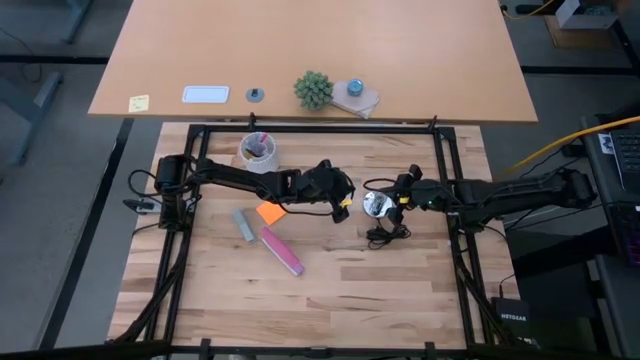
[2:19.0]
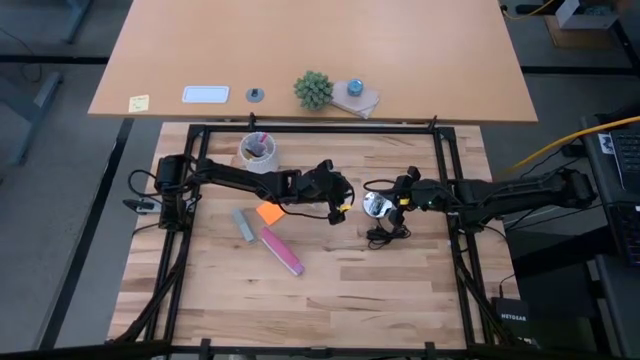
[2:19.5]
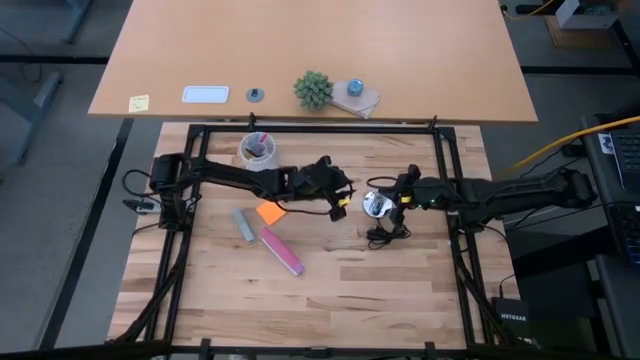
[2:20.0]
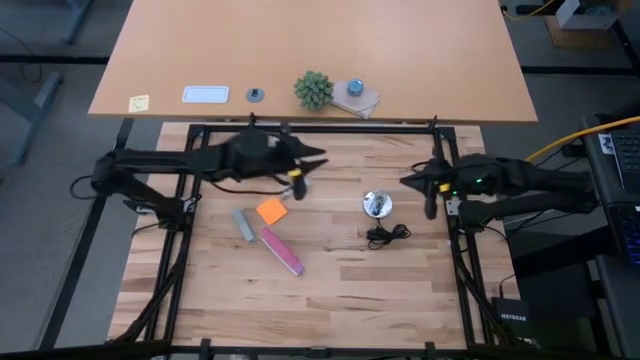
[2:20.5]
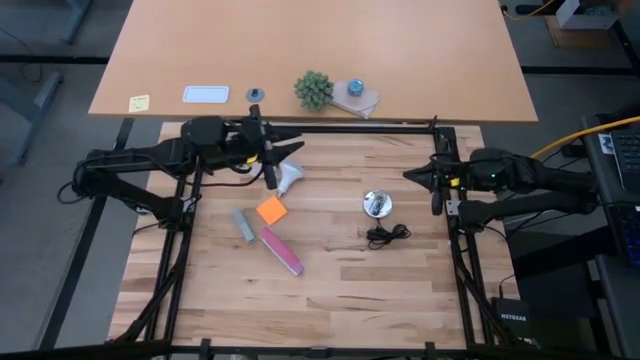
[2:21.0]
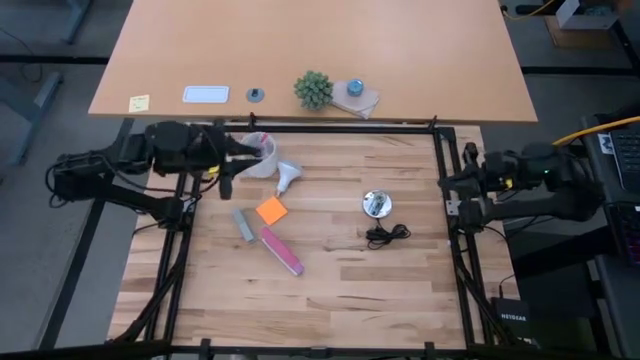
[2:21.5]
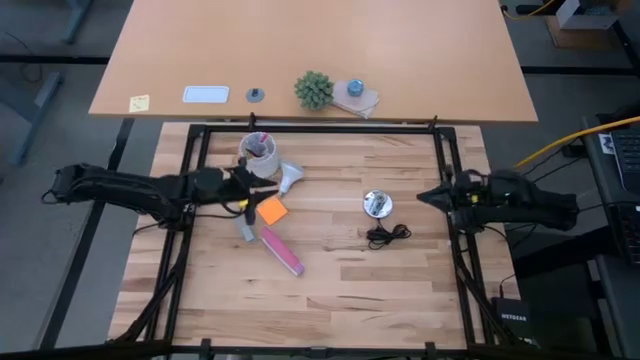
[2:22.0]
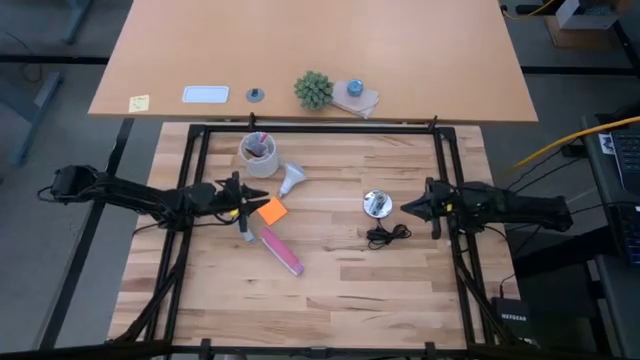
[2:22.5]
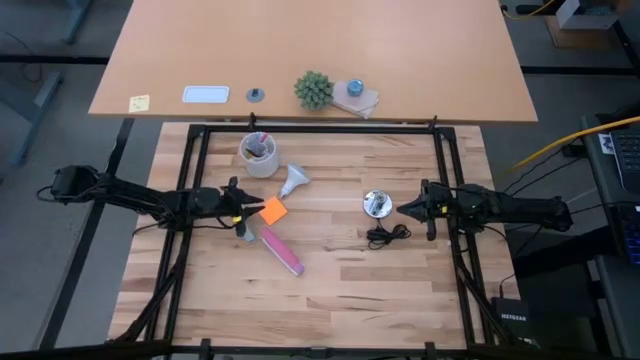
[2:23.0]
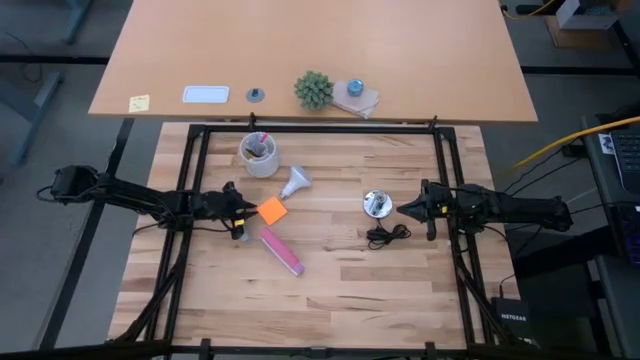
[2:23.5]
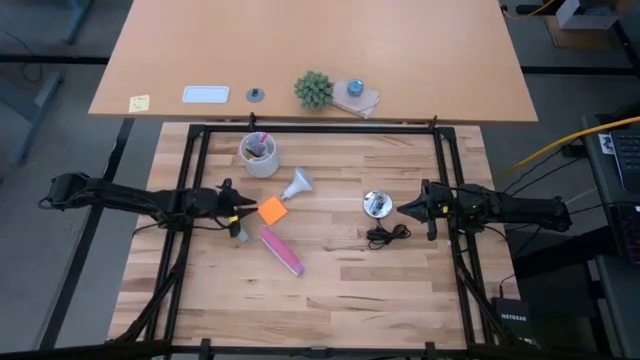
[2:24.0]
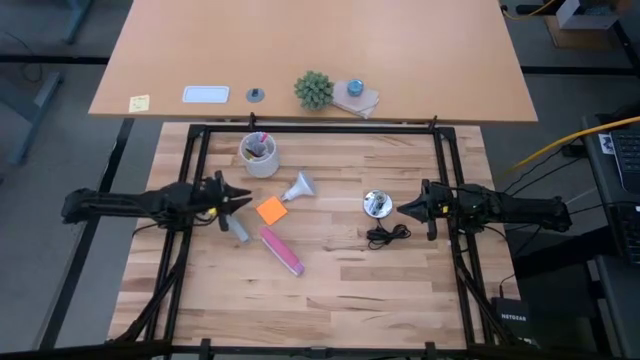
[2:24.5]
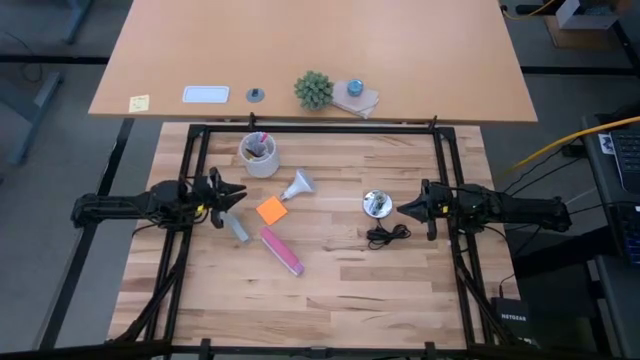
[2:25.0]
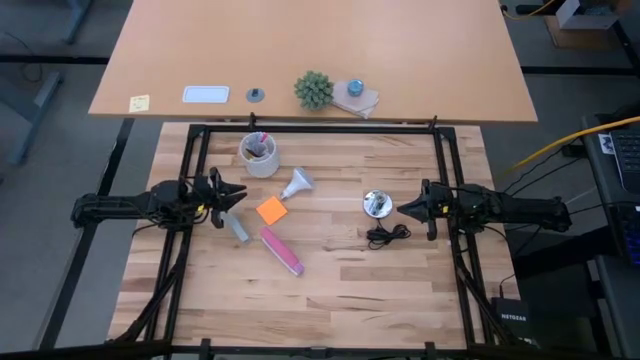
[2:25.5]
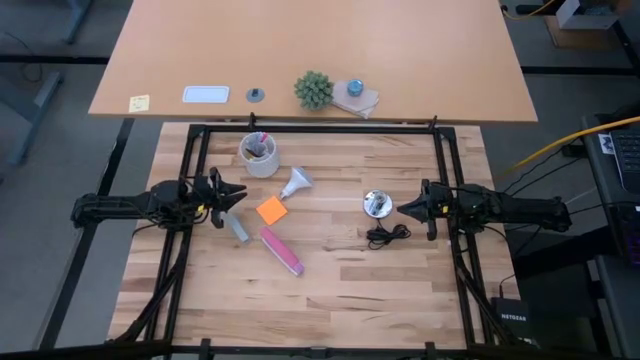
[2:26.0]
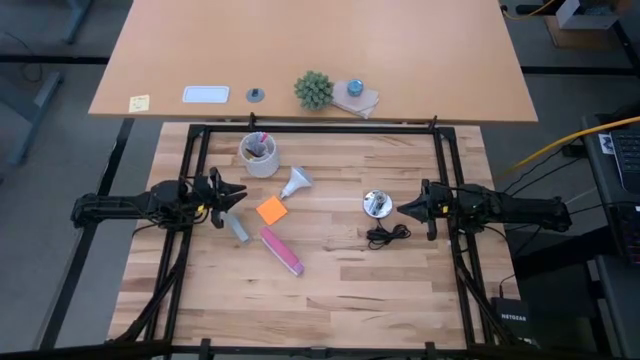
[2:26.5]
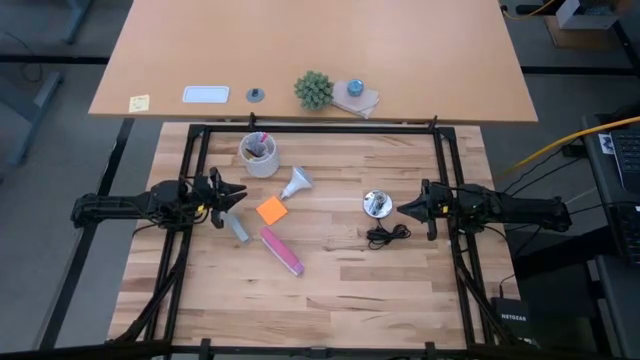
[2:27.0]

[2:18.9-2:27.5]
Task: Screw lightbulb
Return to Home Position

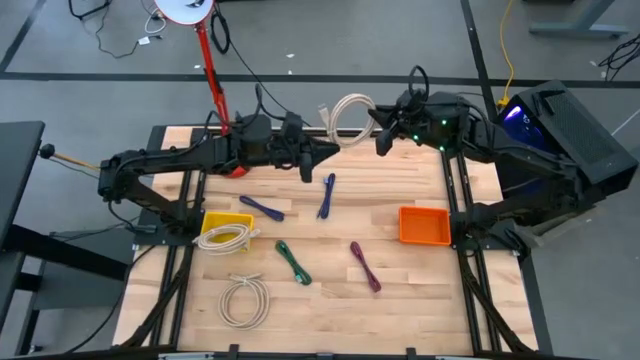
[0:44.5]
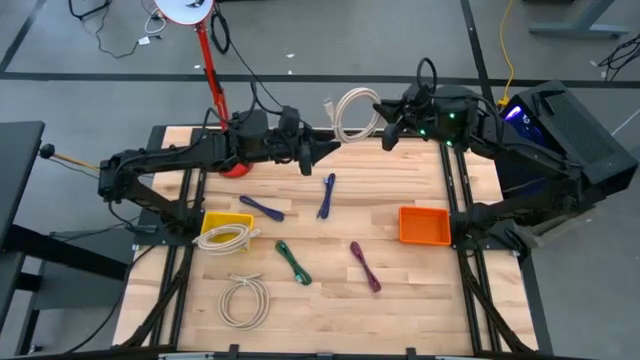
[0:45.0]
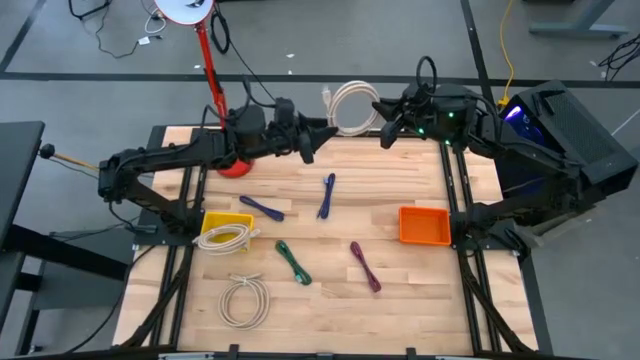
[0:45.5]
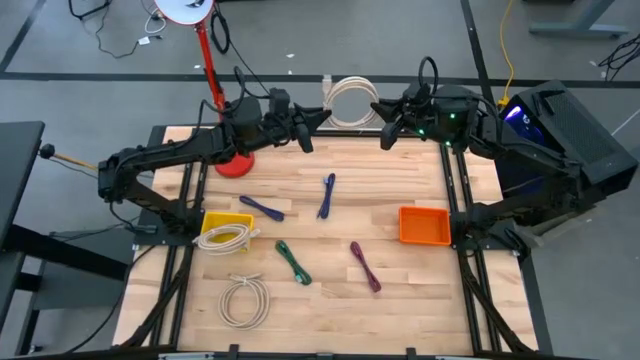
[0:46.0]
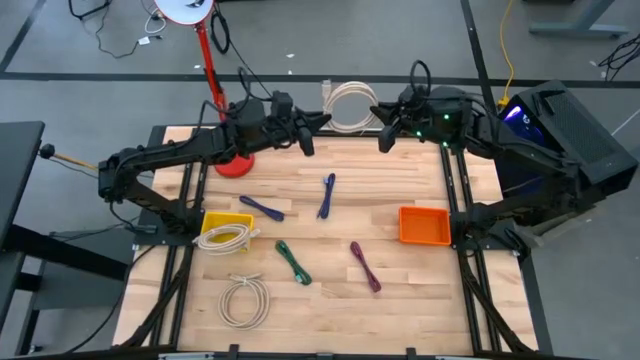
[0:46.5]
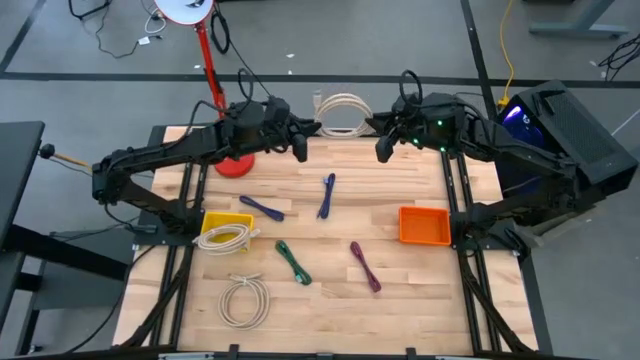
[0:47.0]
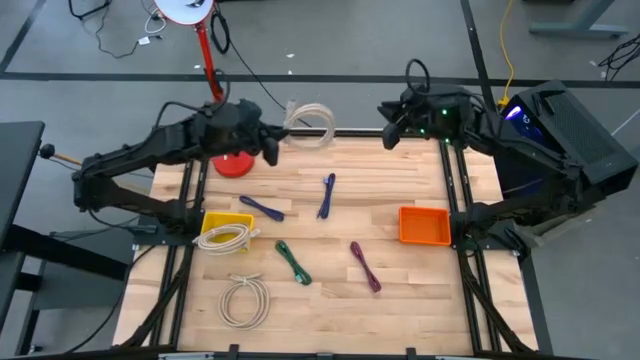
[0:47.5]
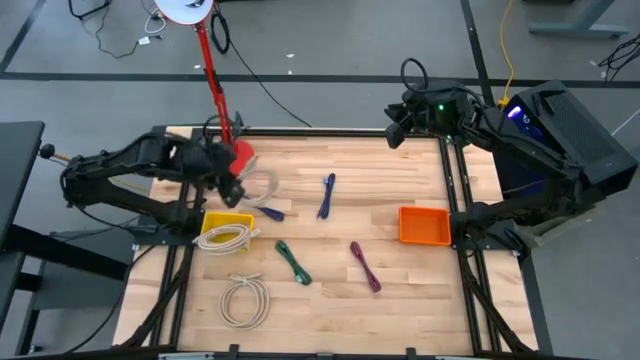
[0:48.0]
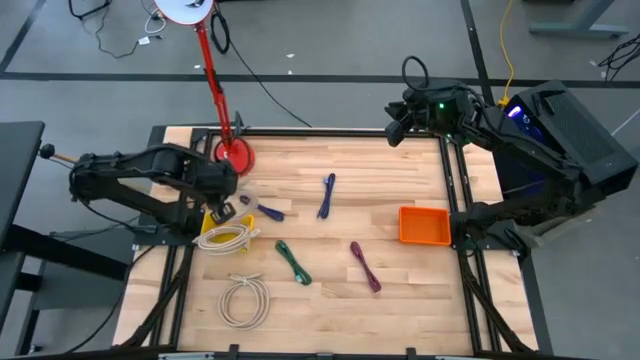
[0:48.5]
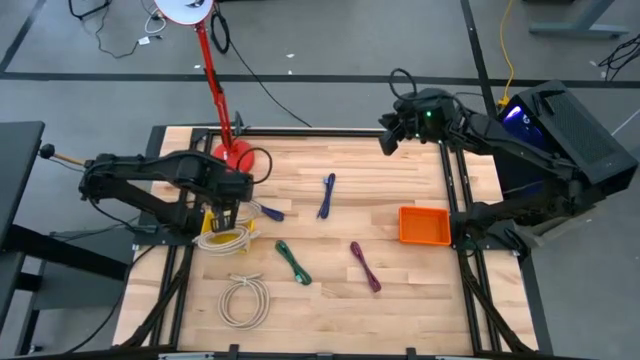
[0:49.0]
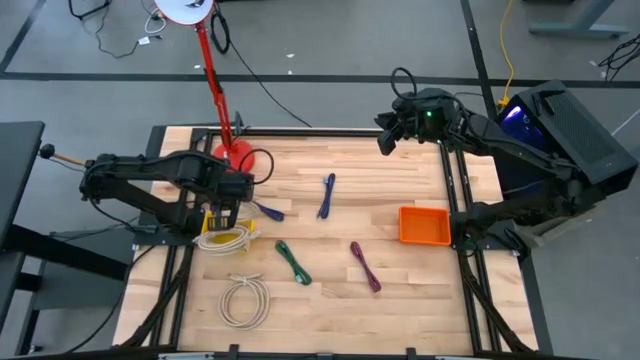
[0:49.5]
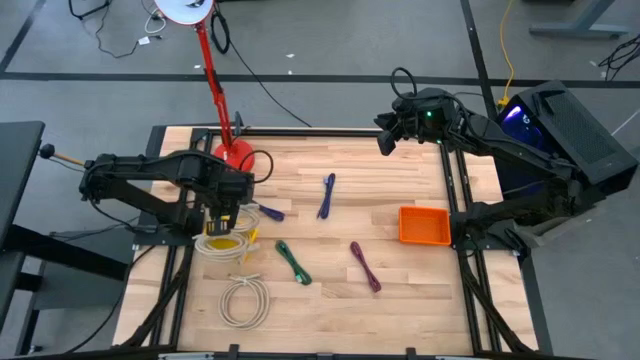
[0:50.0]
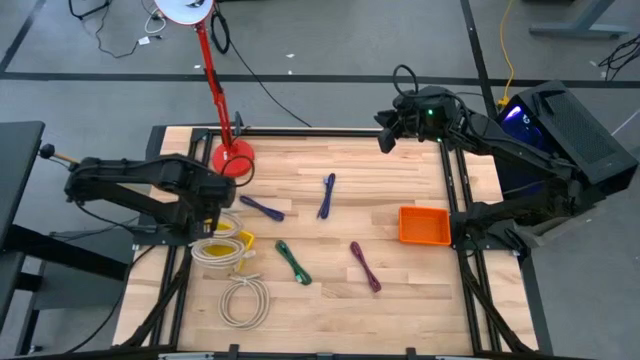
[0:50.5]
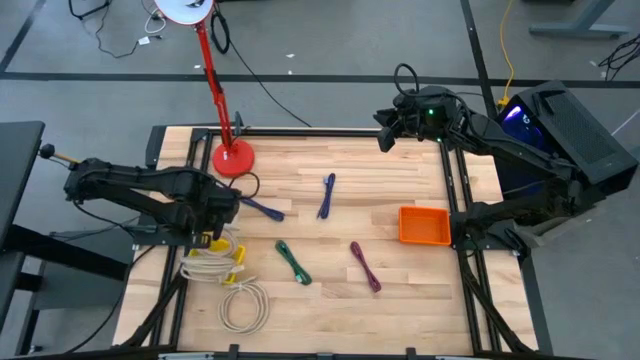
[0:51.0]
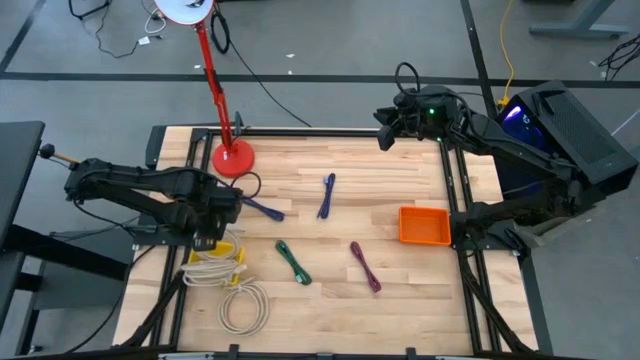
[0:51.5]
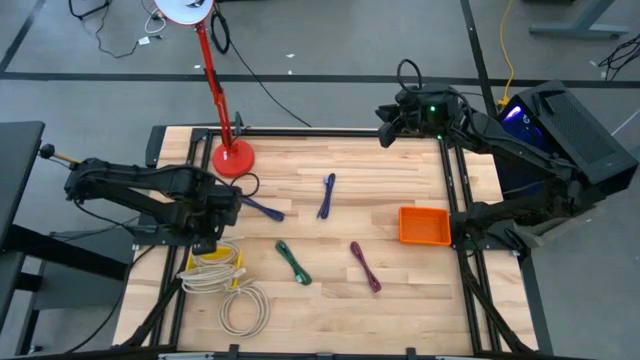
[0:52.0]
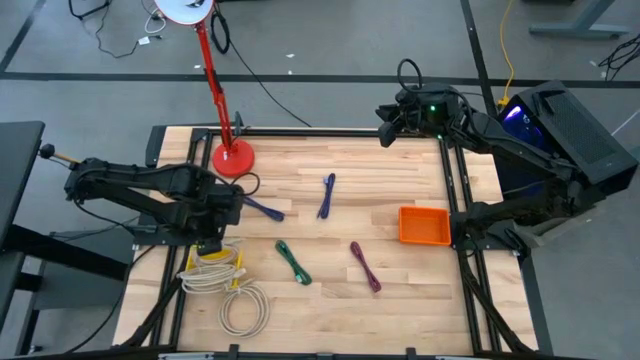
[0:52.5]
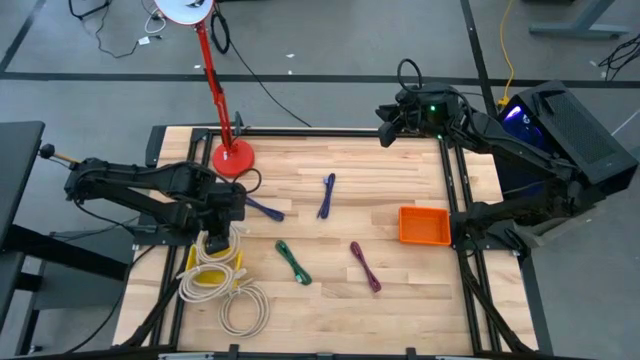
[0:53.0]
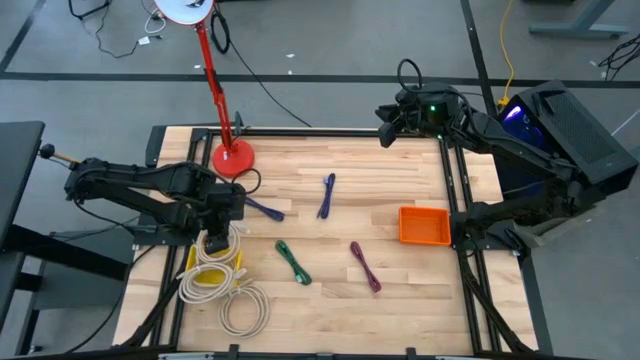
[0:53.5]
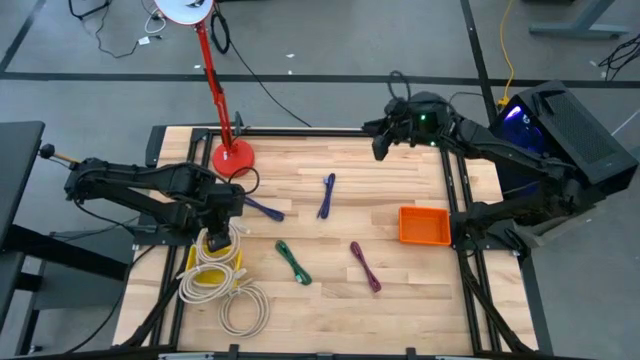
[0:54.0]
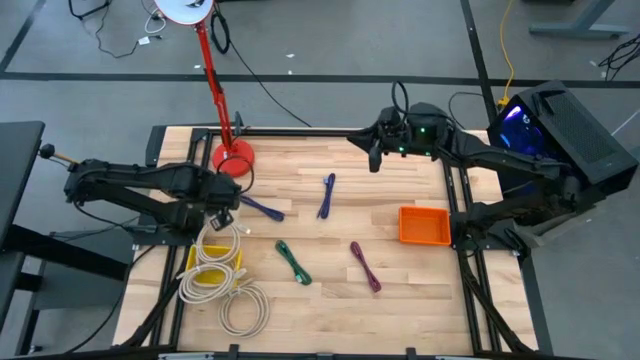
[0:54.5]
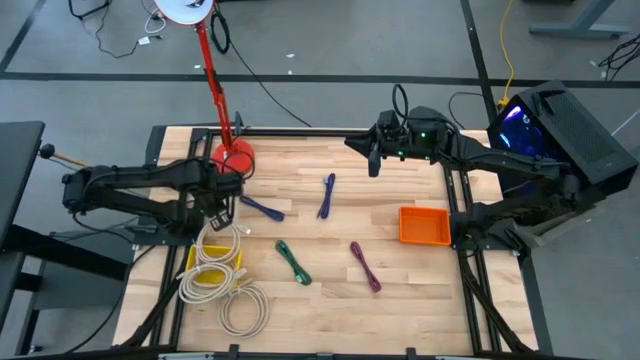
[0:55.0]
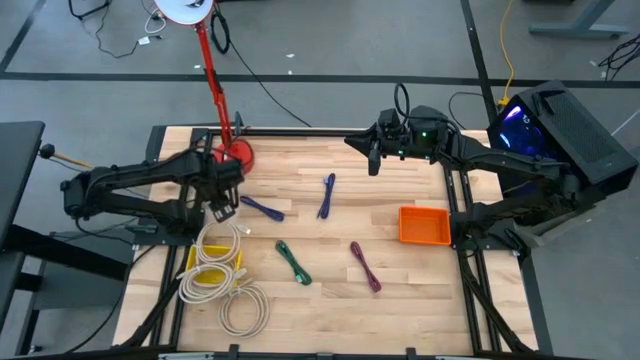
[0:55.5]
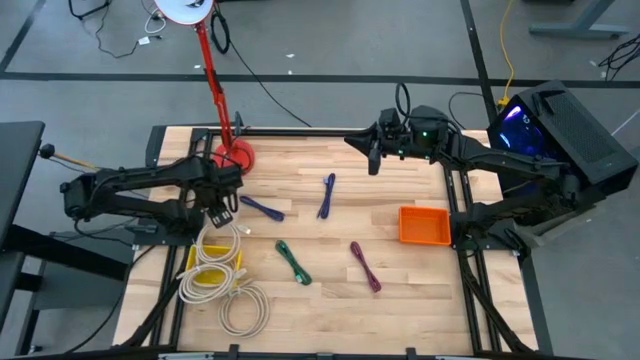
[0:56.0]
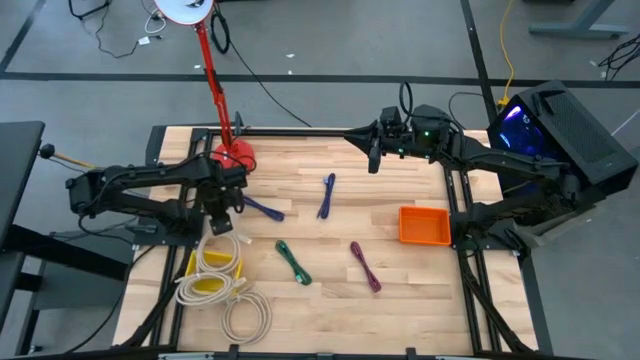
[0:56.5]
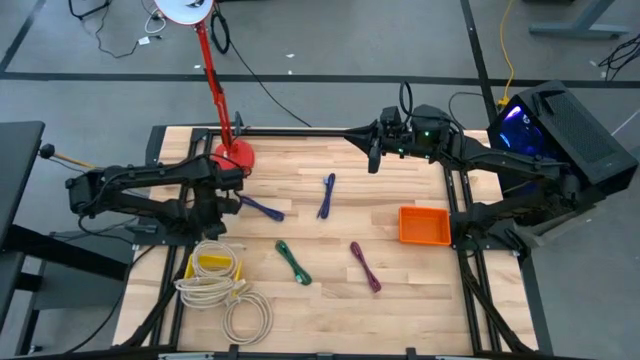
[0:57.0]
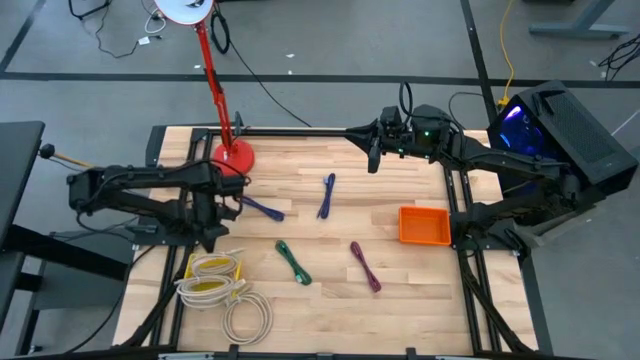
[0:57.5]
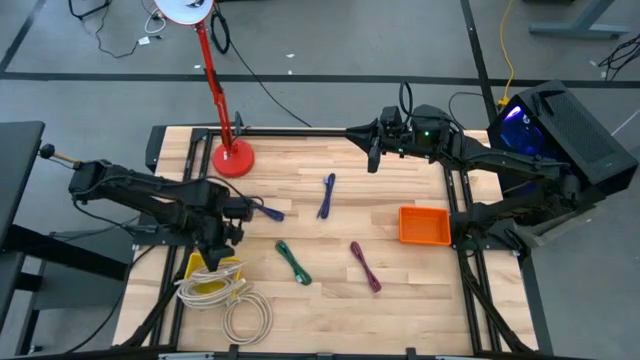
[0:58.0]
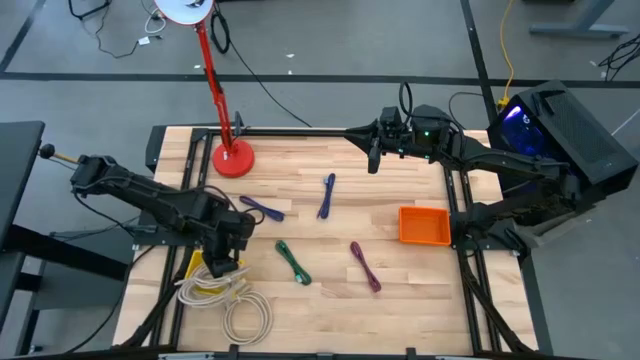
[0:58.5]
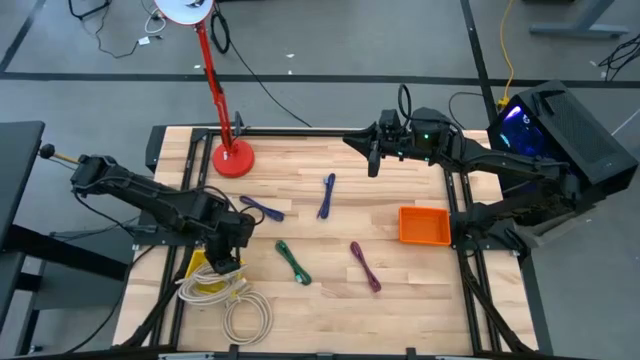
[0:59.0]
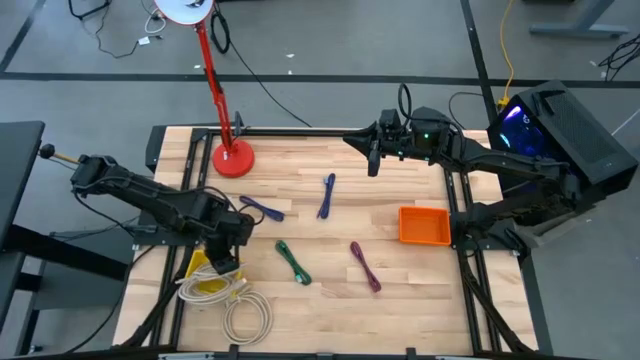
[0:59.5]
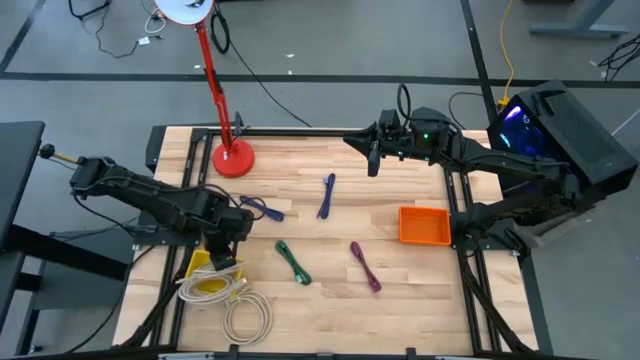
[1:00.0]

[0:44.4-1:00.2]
Task: Pick & Place USB Port
Put the light brown HDMI cable into the yellow bin
